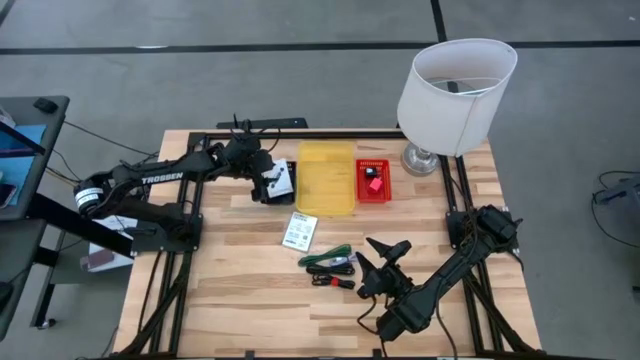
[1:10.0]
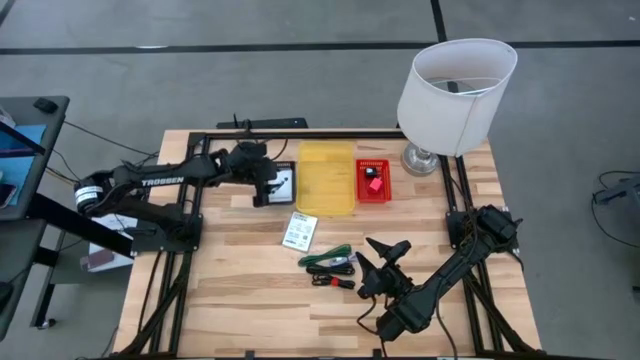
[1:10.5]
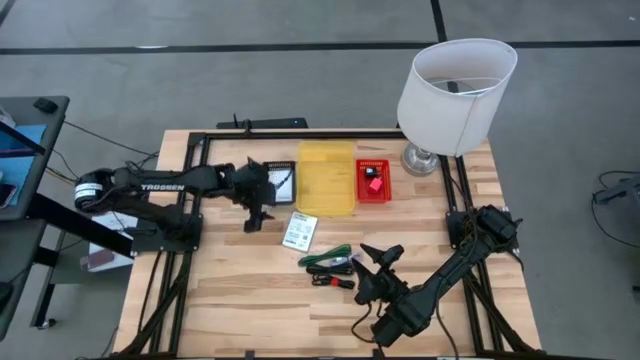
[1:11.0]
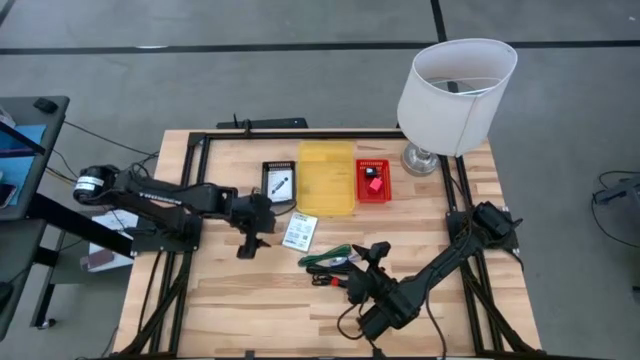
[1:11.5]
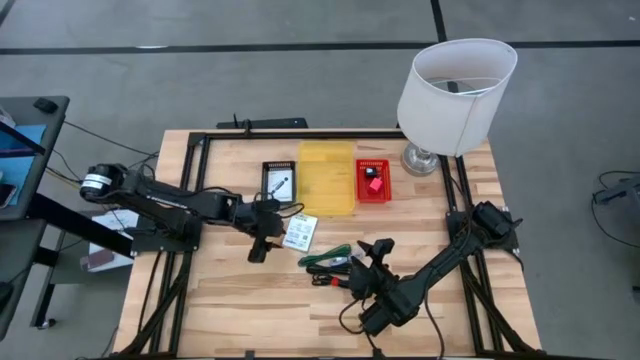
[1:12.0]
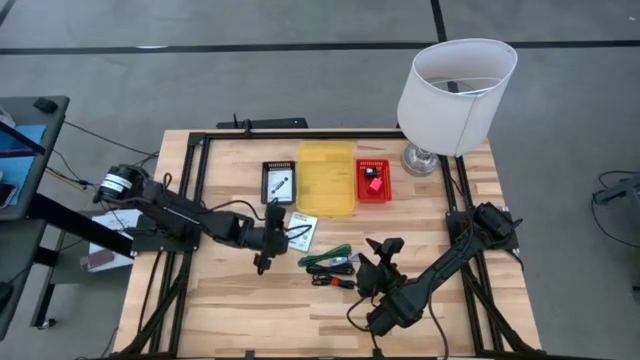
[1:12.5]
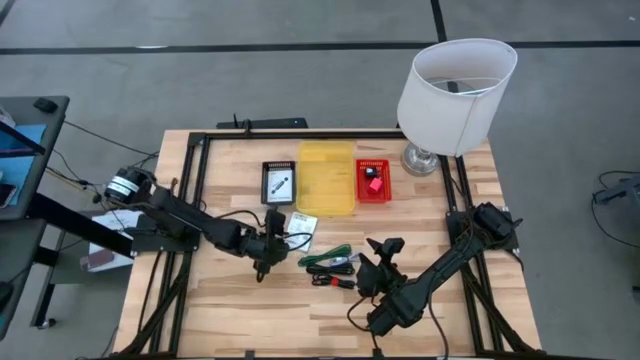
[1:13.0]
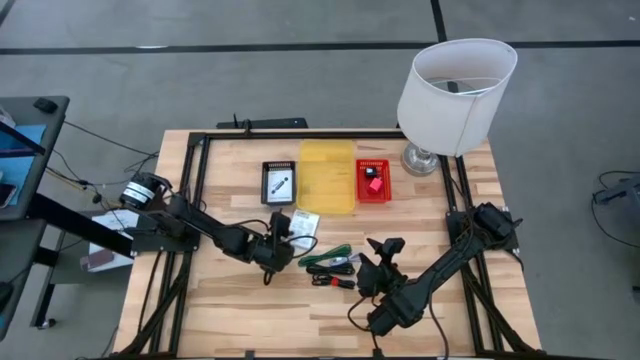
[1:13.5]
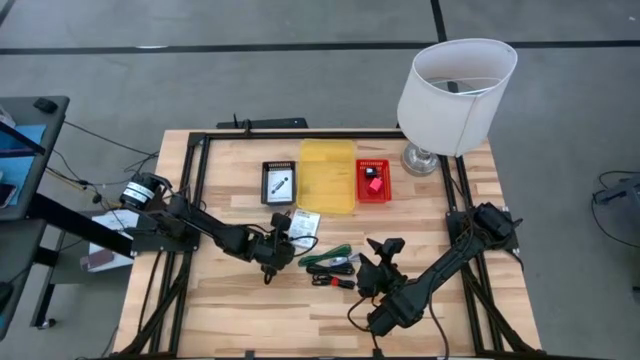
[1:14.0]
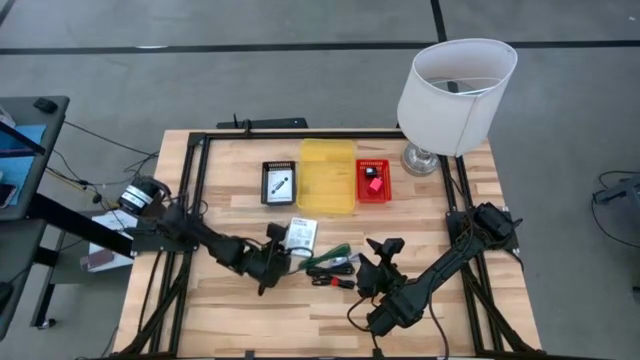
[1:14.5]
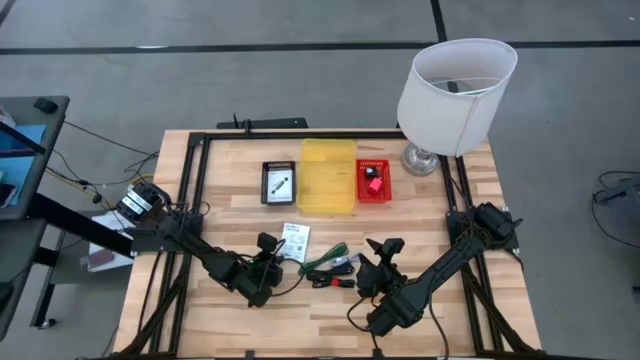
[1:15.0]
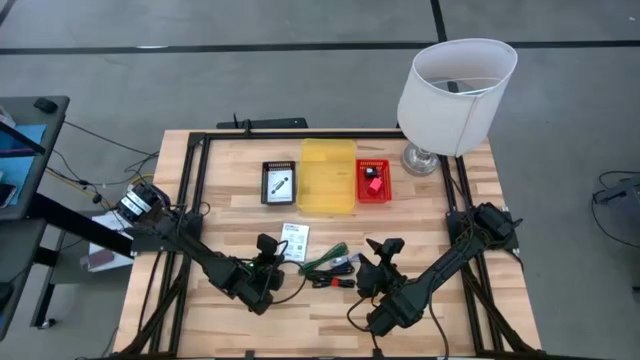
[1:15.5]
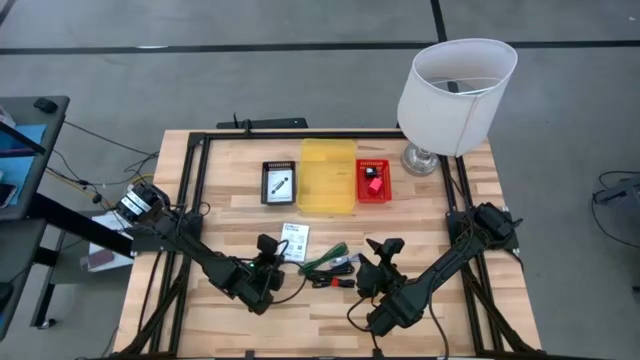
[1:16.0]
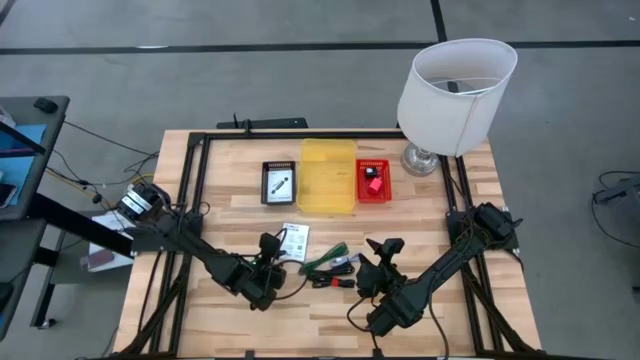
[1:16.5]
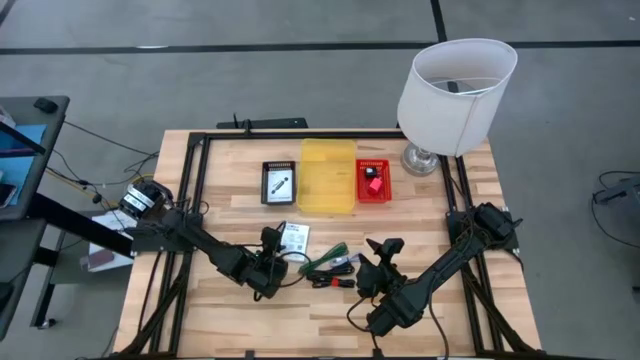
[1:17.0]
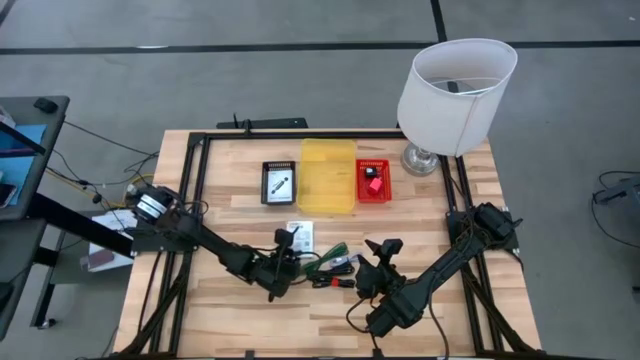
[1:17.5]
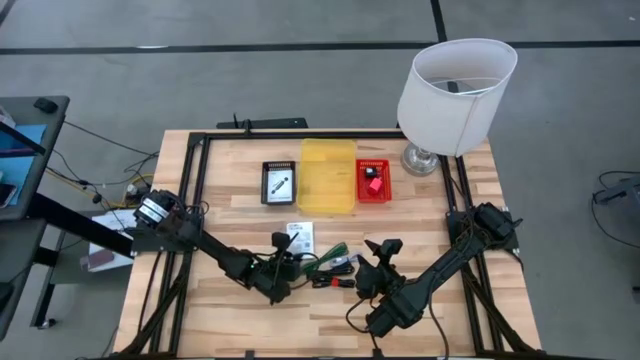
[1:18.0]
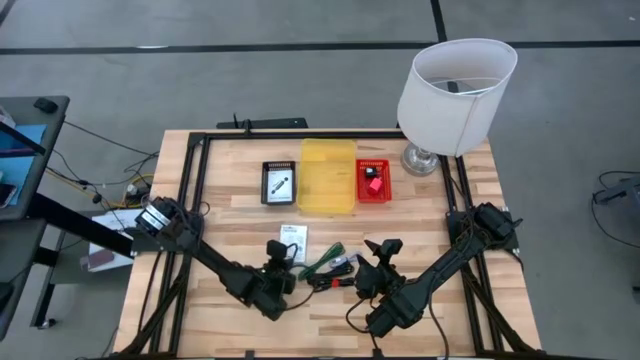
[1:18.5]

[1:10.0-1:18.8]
Task: Pick and place items into bin
Put the card reader box into the black bin

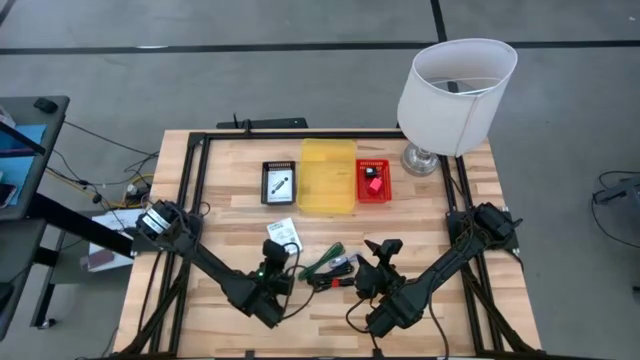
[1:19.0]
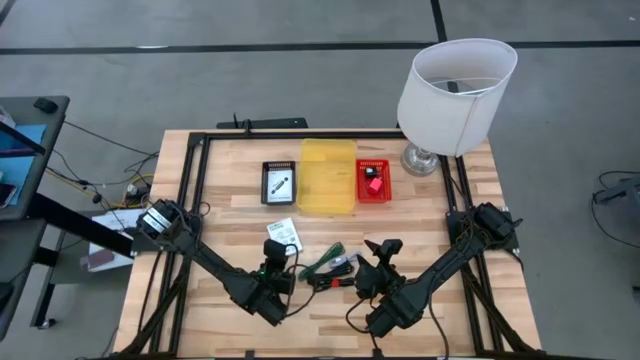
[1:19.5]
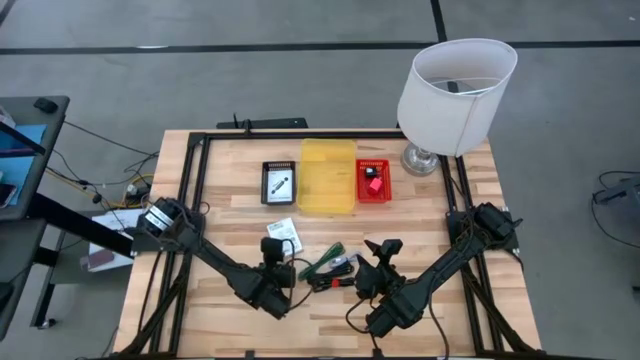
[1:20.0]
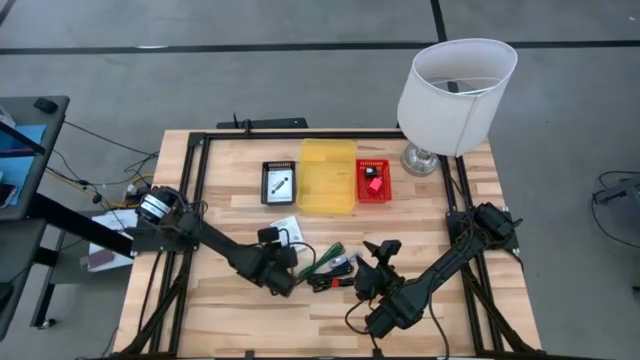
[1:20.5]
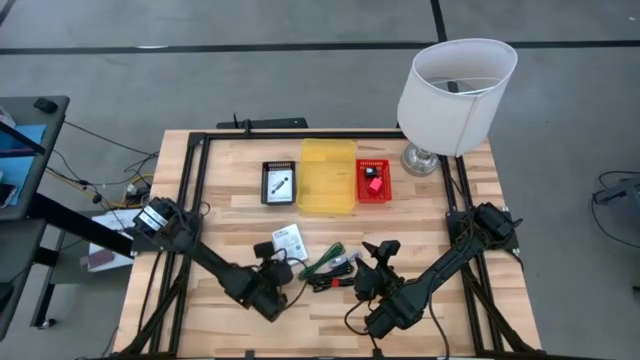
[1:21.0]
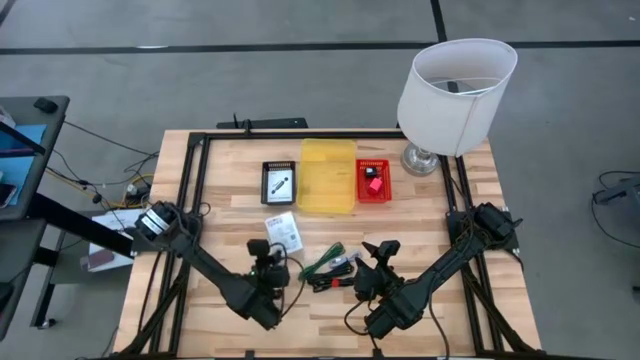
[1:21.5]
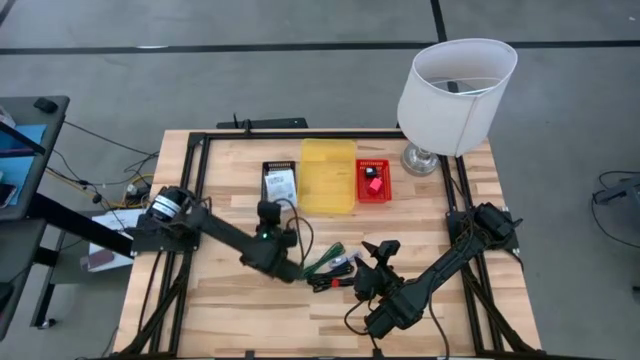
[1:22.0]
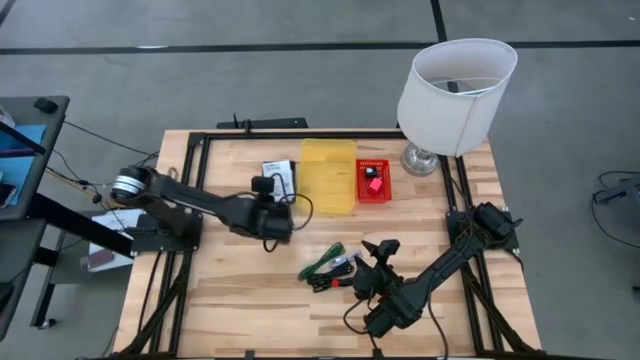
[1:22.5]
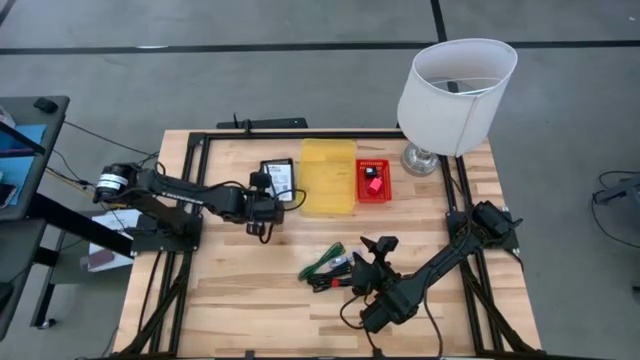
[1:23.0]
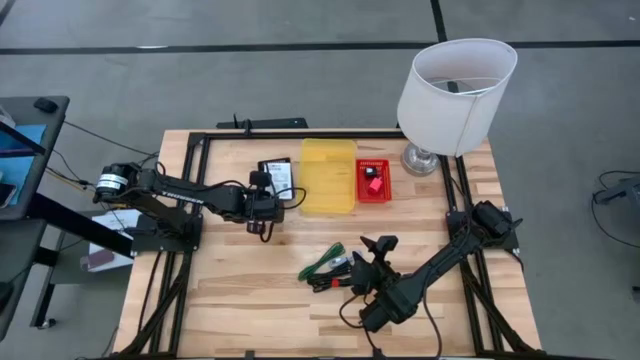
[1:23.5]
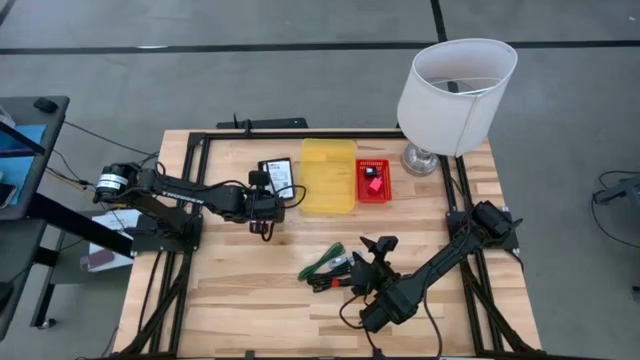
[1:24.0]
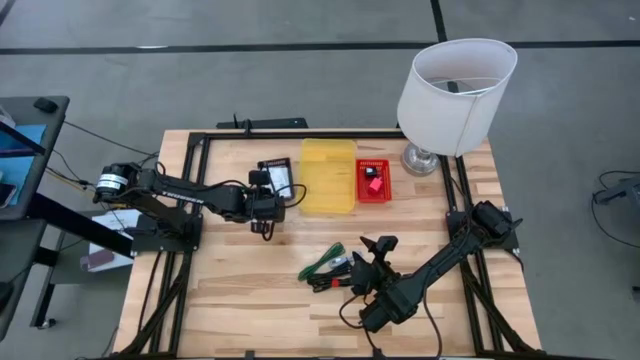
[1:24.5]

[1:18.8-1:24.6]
Put the card reader box into the black bin

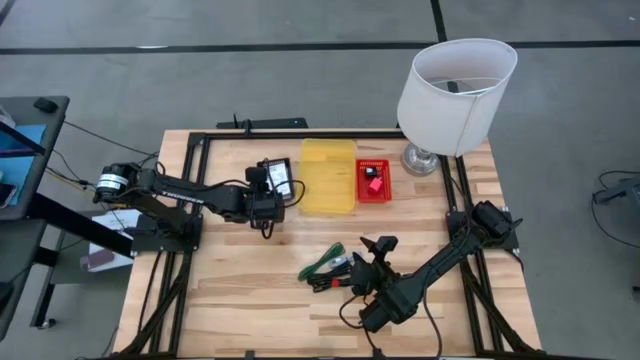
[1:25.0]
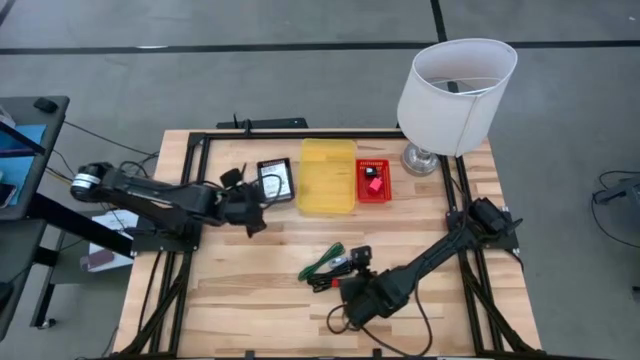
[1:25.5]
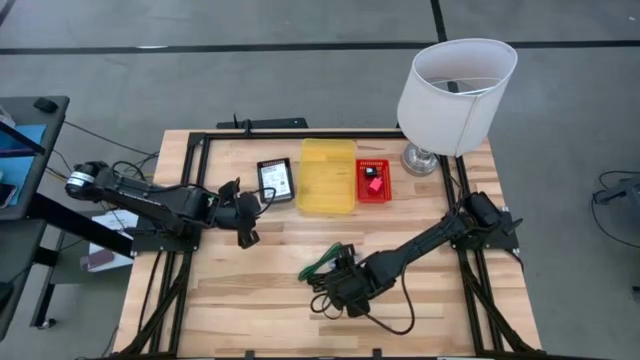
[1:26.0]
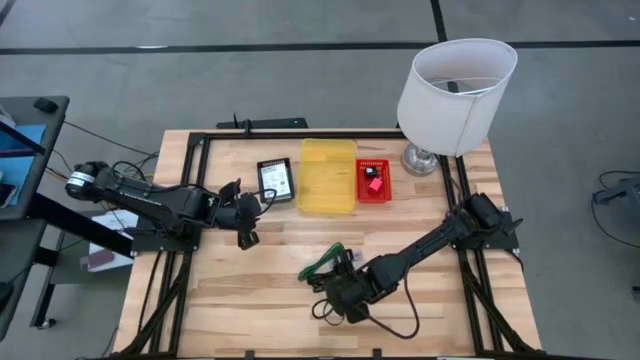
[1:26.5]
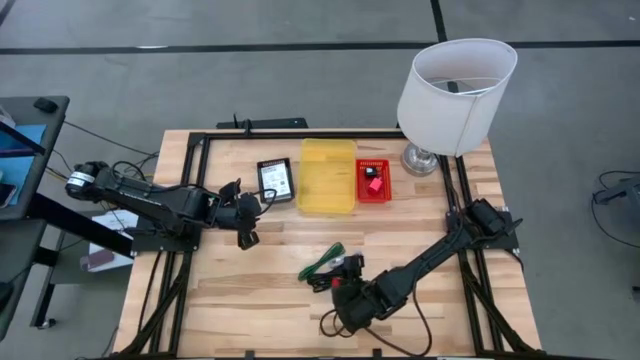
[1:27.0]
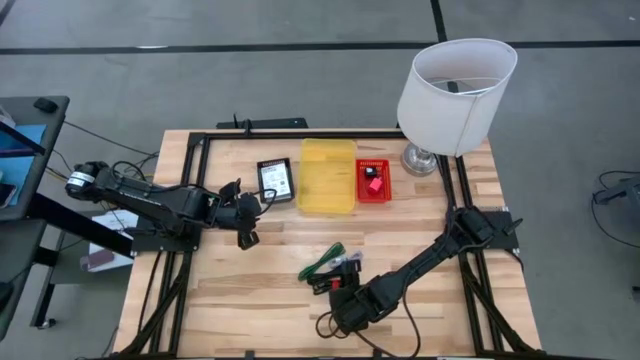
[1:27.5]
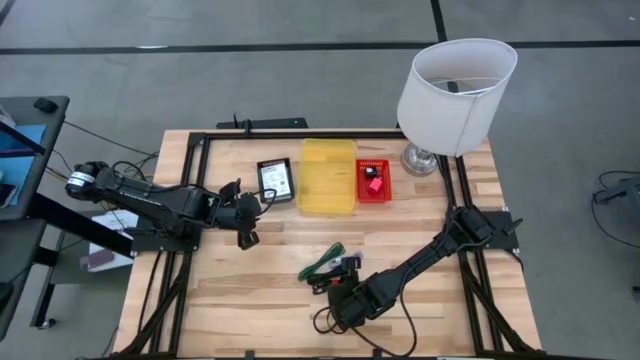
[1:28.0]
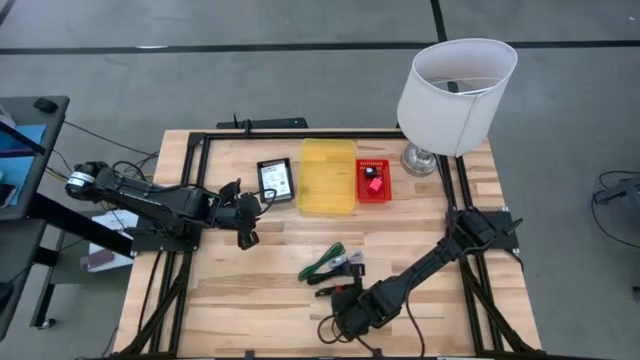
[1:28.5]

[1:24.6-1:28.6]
Put the bottom black charger cable into the yellow bin

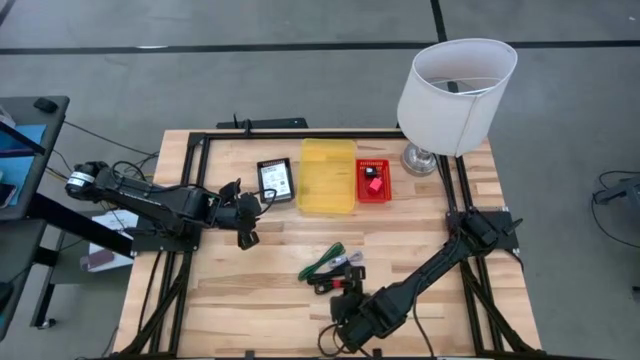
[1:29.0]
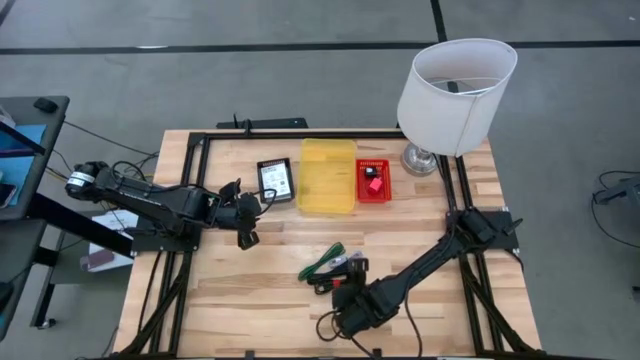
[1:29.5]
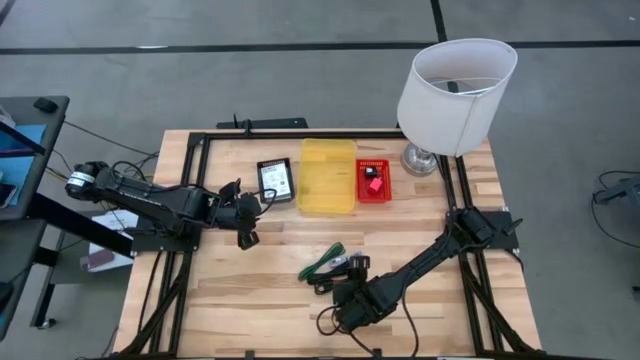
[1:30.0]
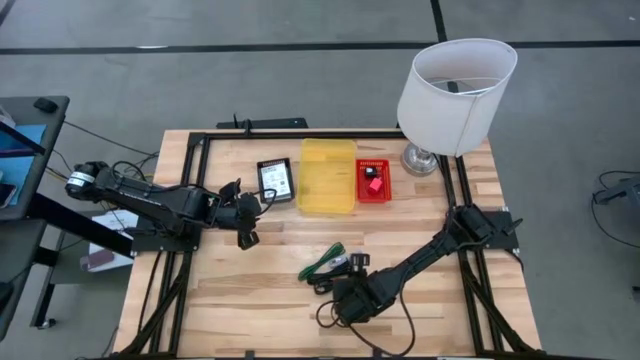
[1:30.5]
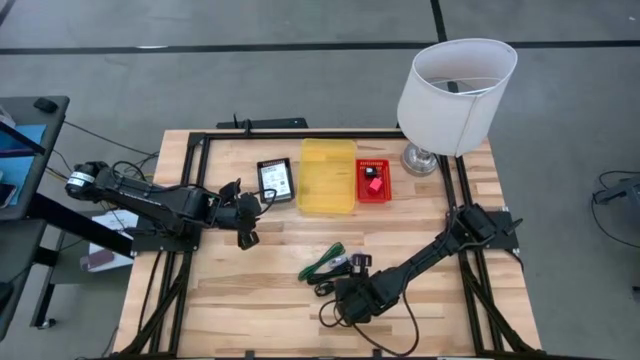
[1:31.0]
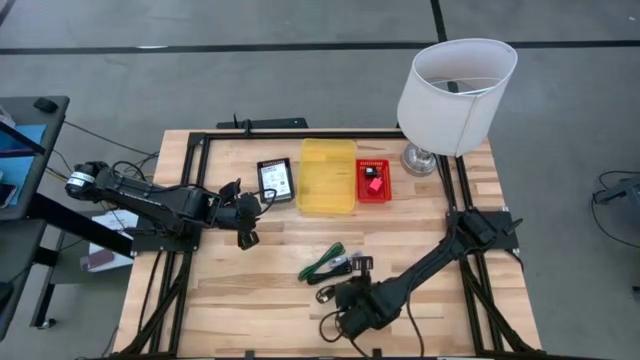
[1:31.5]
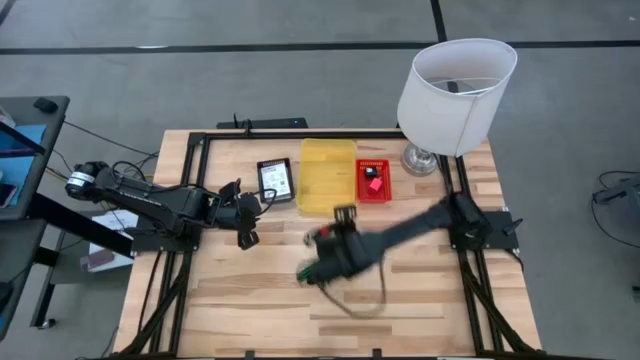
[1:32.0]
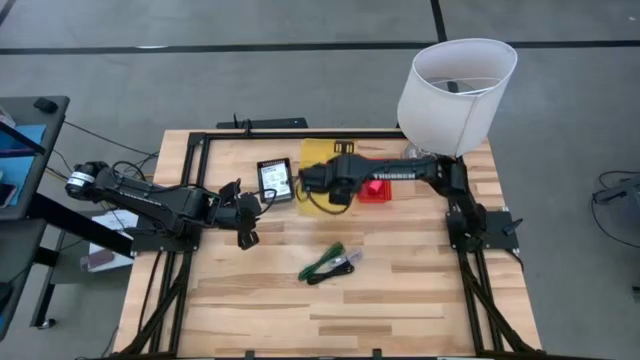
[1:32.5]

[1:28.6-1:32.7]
Put the bottom black charger cable into the yellow bin
